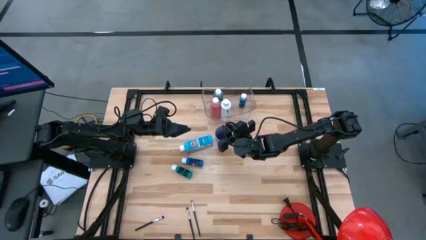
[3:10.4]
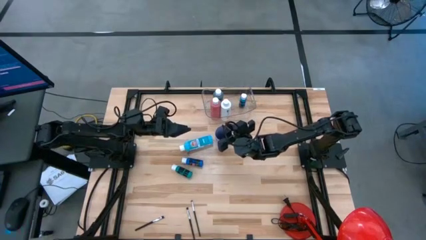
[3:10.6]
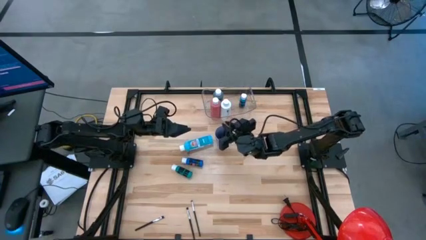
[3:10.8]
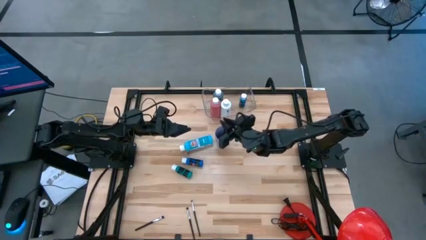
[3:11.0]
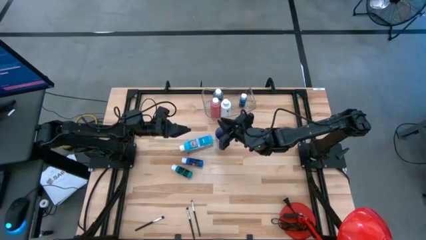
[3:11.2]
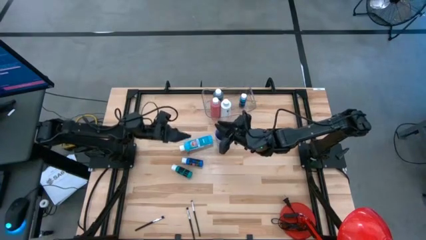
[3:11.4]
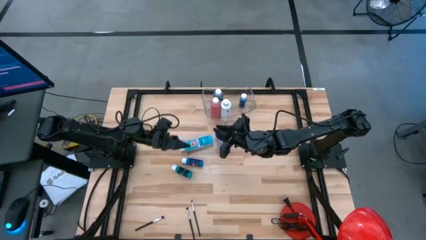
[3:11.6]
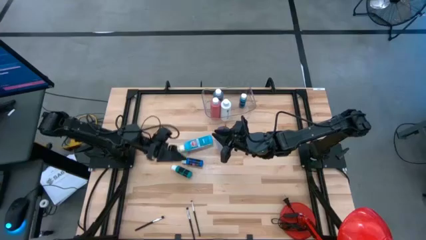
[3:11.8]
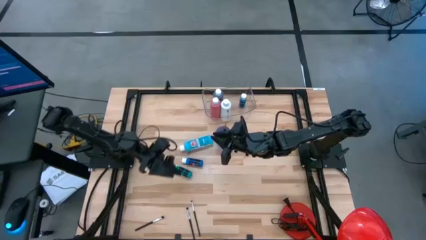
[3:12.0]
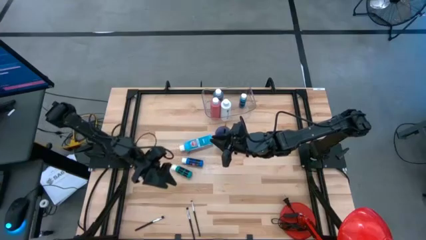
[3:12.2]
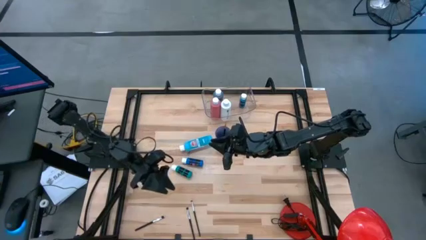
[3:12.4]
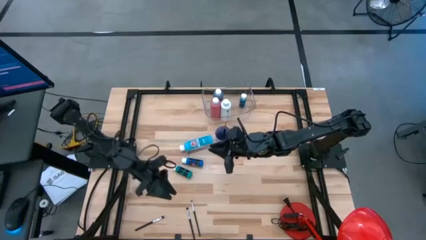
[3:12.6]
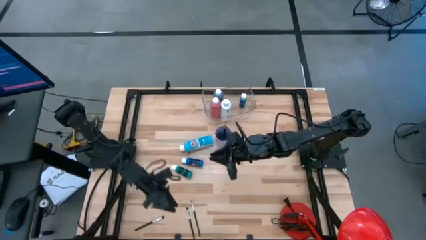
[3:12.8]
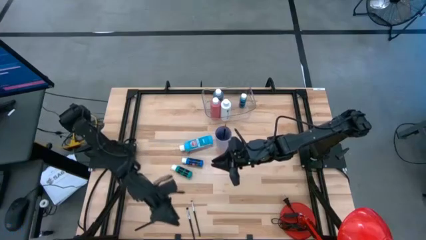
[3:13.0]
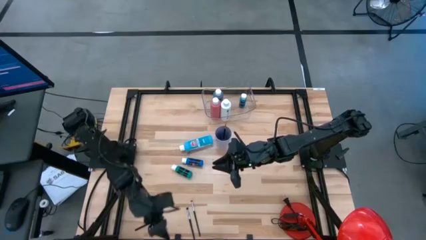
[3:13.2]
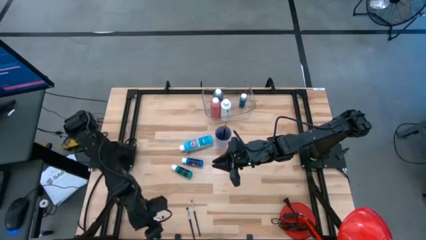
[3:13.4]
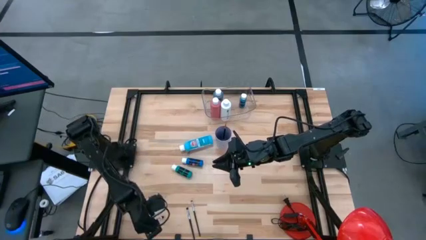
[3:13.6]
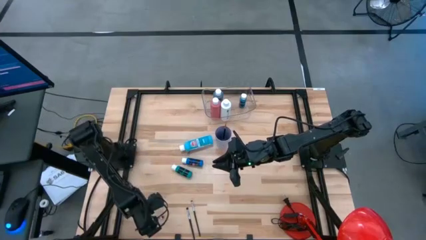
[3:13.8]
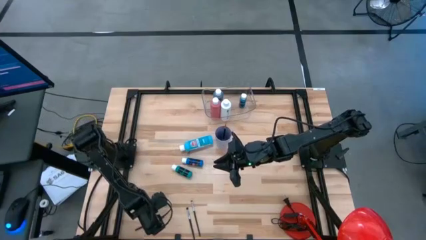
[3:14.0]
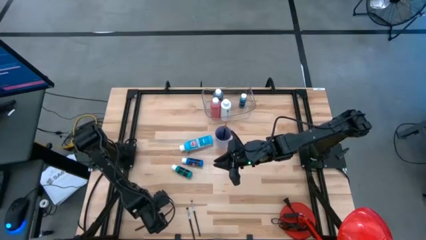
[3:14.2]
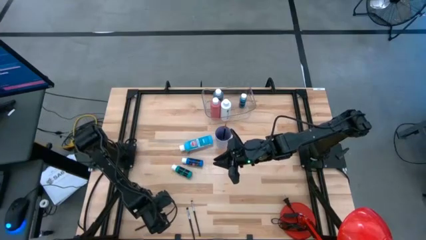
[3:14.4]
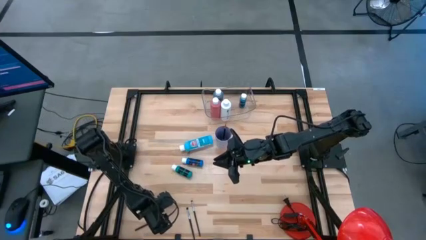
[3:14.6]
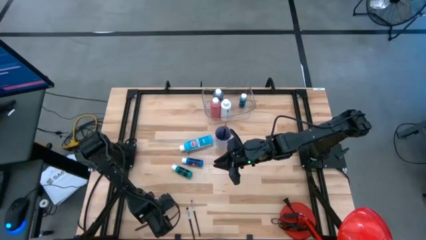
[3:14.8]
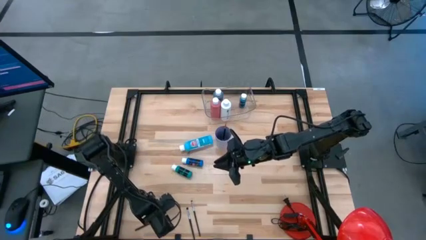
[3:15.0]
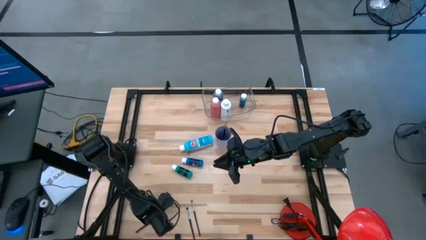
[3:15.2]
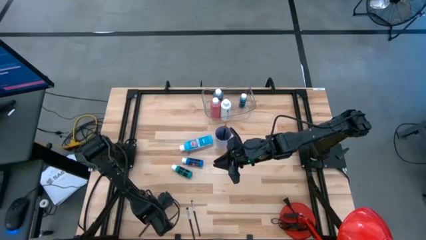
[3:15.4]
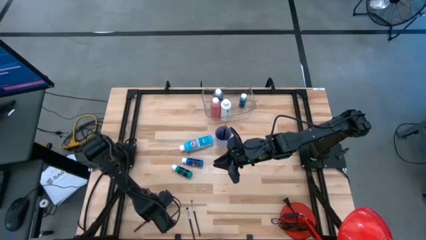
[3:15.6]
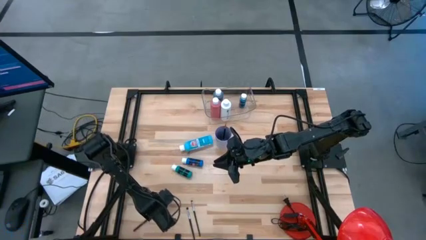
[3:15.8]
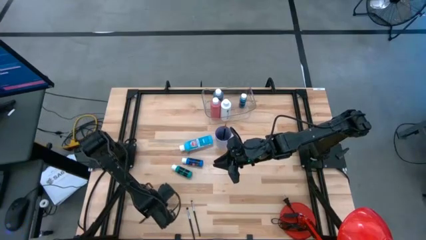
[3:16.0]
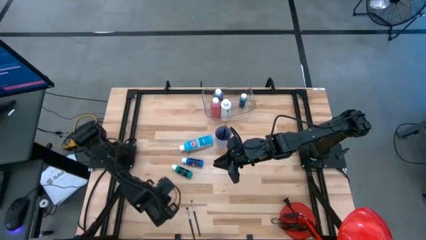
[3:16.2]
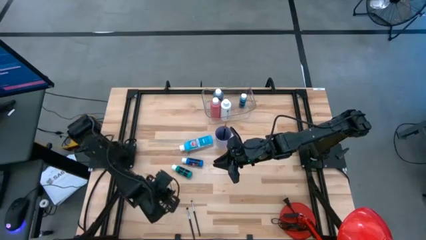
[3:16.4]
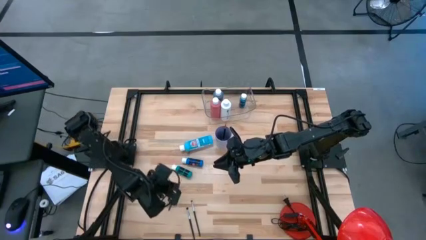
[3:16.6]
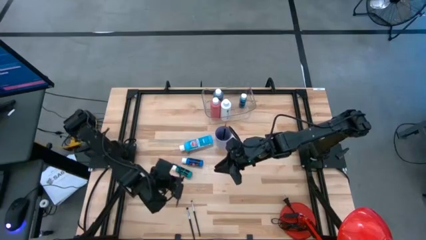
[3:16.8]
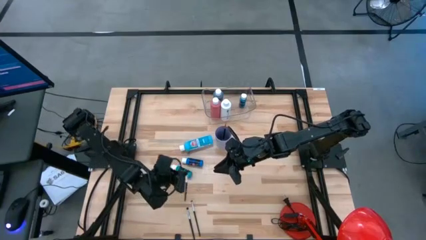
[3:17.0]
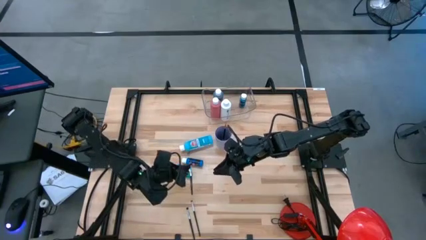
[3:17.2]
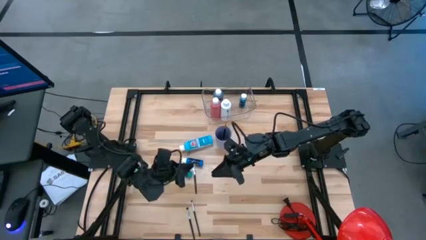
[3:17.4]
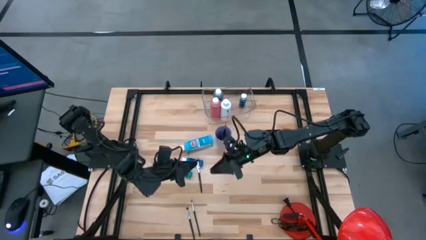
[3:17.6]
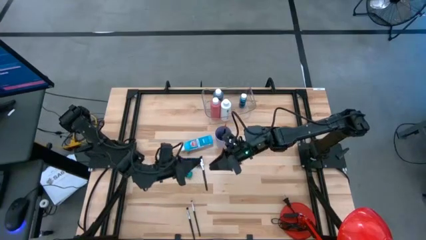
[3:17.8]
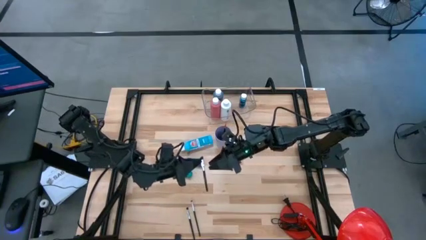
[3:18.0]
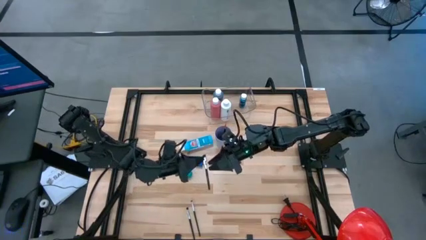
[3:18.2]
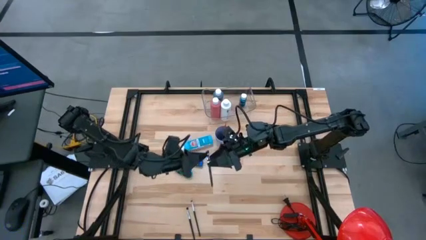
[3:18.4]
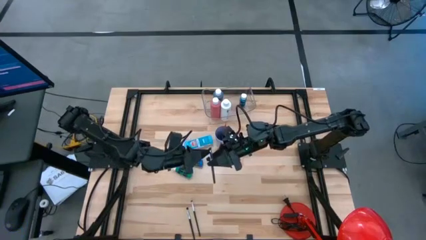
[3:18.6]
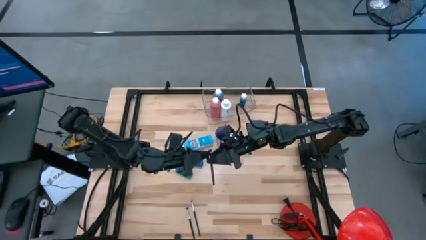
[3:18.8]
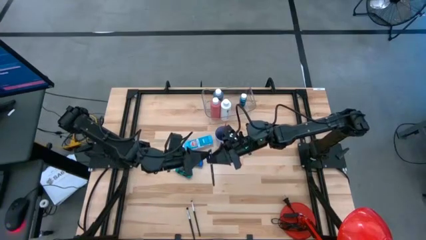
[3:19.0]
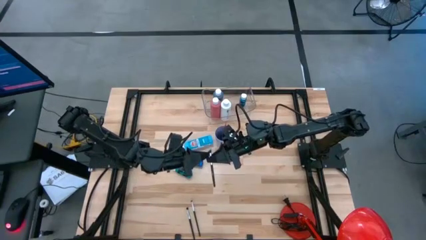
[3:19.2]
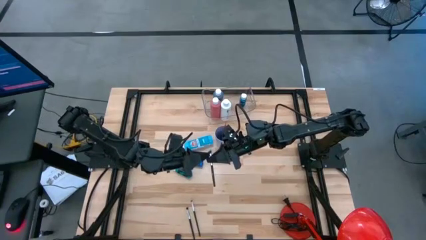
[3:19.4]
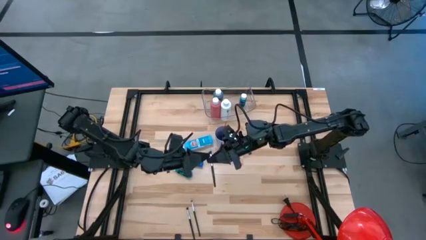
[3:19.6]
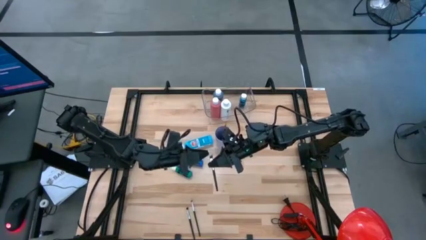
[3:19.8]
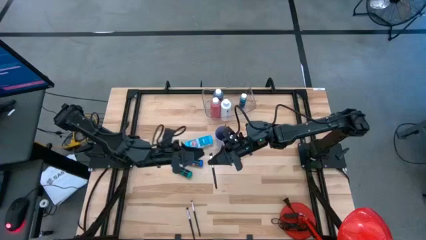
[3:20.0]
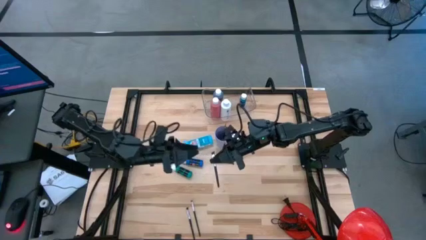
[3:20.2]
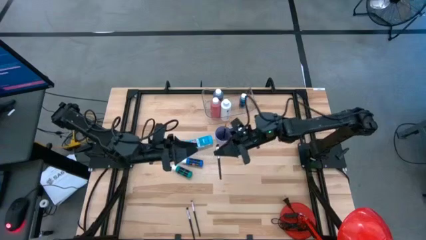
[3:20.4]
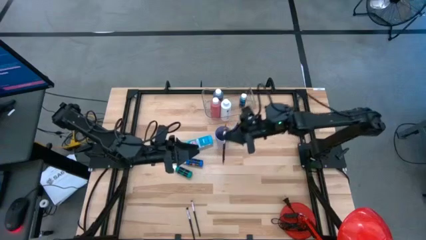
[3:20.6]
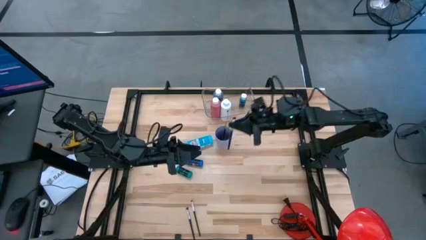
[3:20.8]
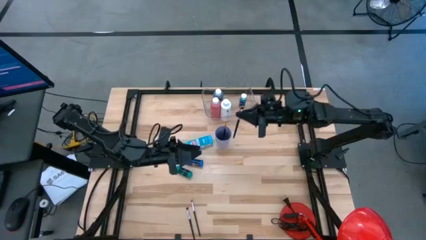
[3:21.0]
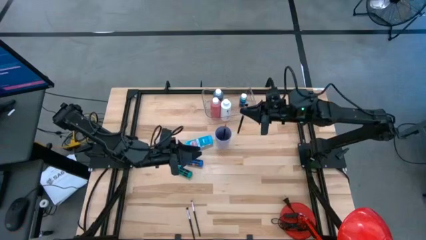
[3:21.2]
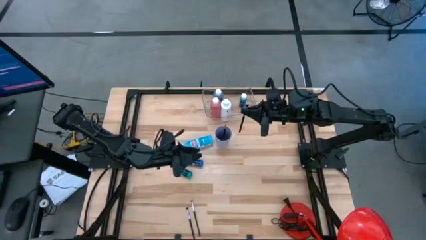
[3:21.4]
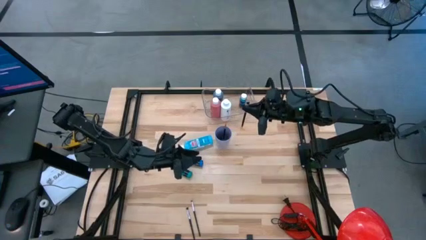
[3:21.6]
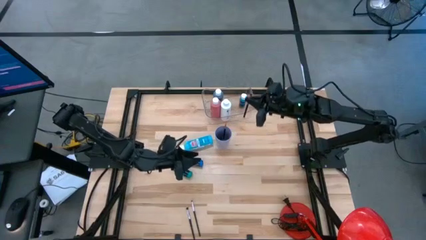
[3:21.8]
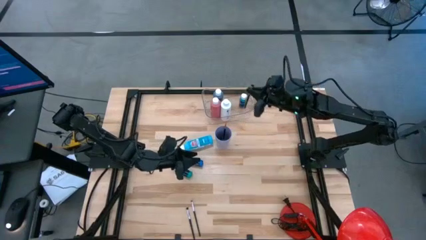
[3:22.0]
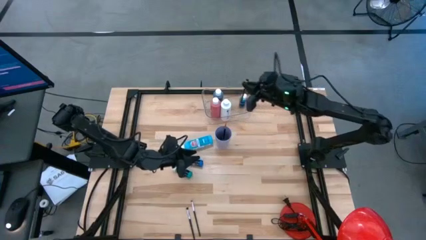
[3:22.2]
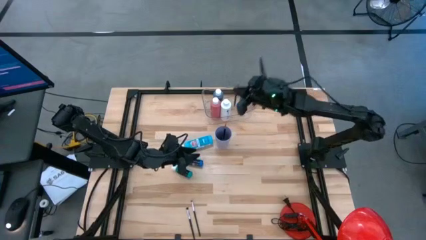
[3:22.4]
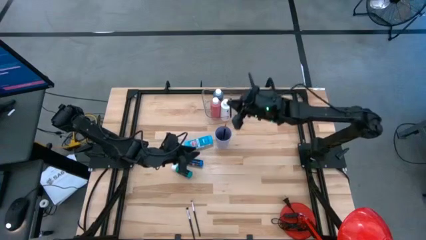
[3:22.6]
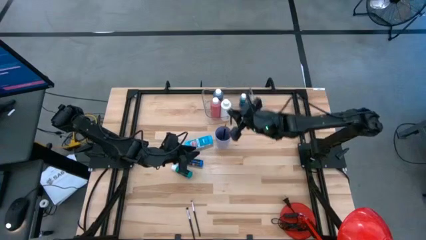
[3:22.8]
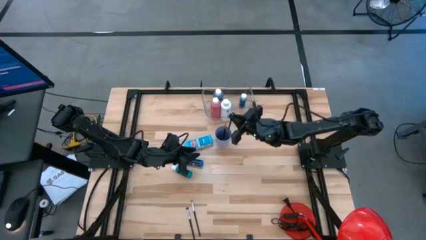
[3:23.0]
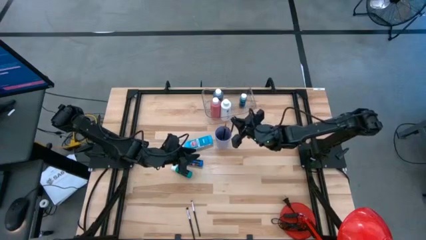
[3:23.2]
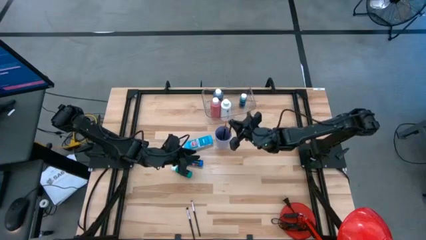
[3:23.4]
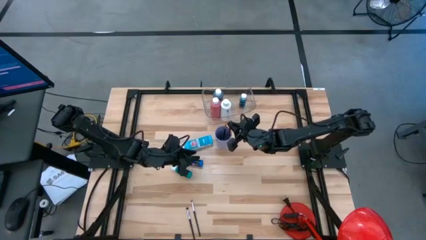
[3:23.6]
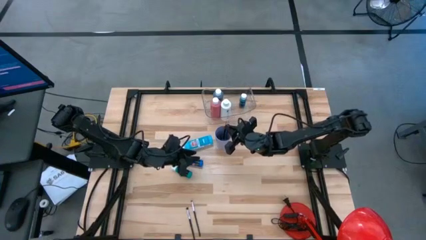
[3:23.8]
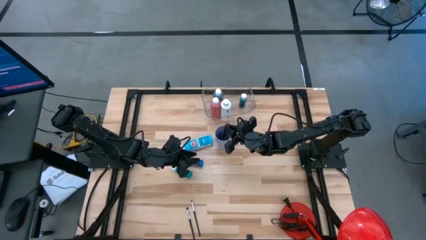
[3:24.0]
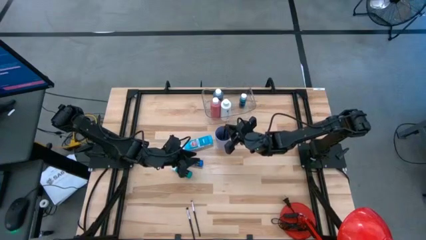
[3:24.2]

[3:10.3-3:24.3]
Task: Pick & Place Paint Supplies
Put the black paint brush into the violet cup

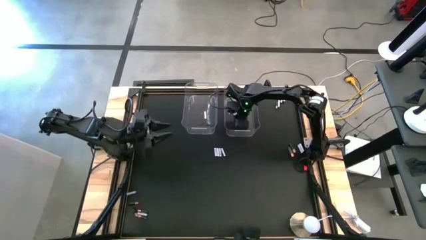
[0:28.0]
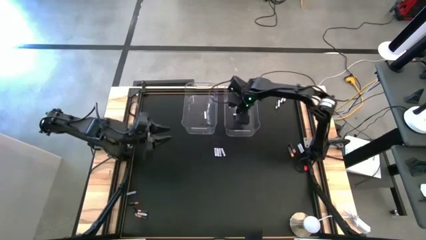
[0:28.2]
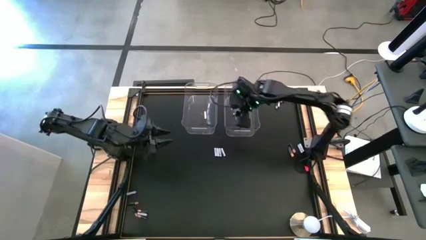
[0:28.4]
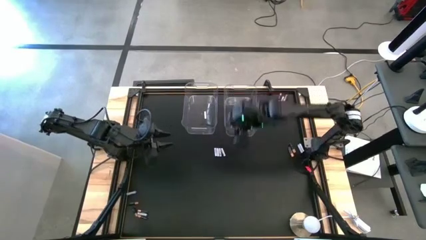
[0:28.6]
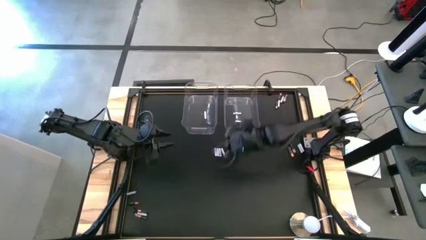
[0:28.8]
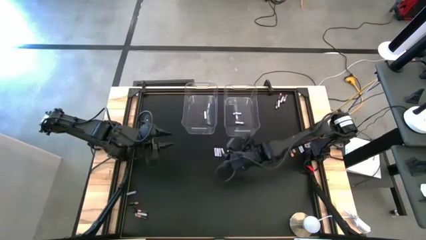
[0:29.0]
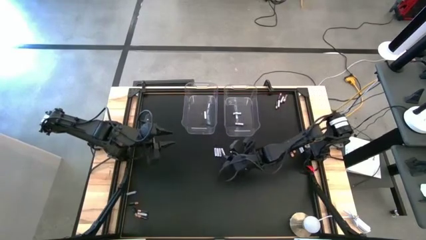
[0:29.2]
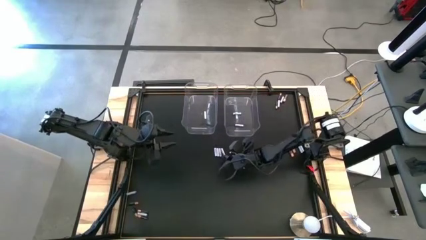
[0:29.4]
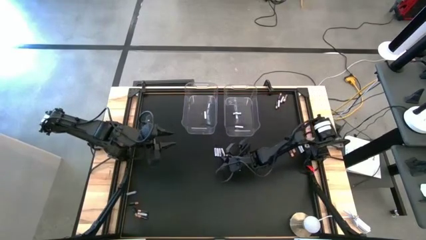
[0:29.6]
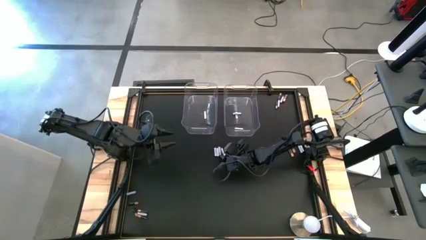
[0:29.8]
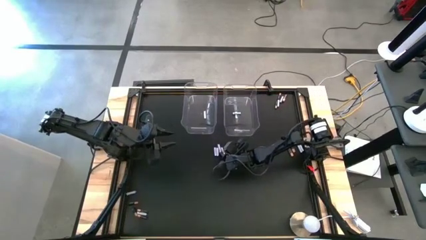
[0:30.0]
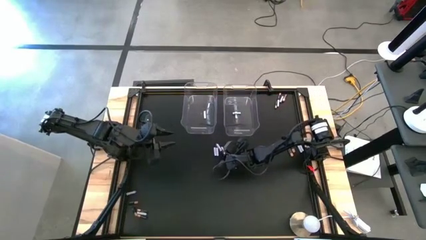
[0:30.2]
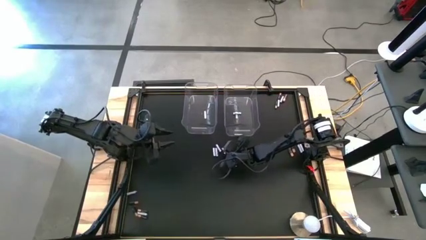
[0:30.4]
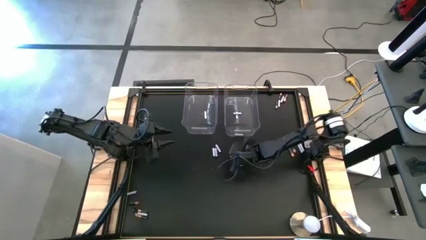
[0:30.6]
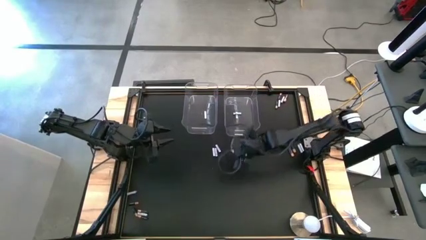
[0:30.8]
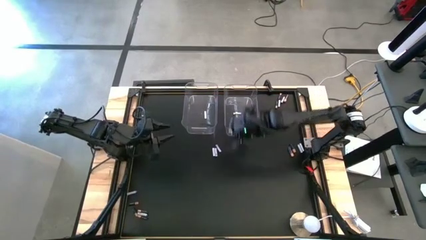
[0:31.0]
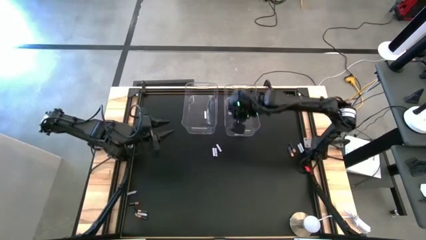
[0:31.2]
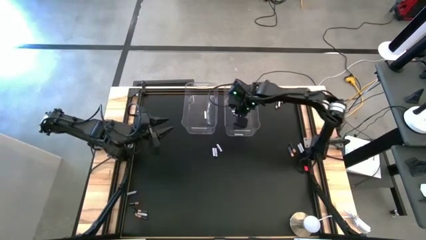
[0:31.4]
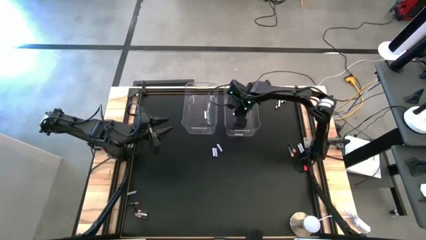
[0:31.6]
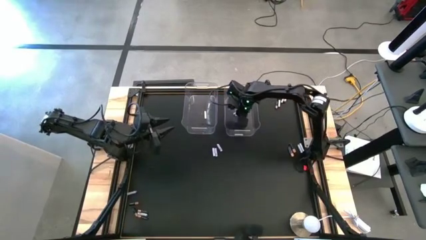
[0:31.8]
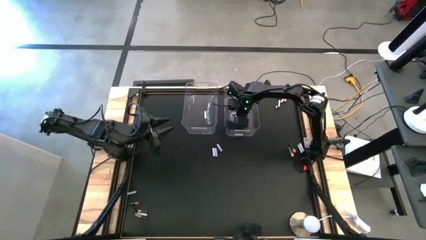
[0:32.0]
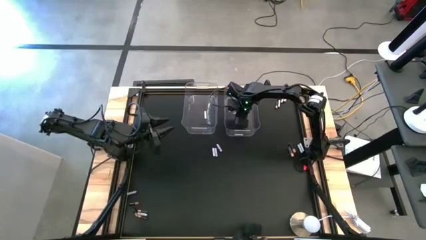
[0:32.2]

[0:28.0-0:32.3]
Task: Sort batteries
Put the white battery into the right transparent bin
